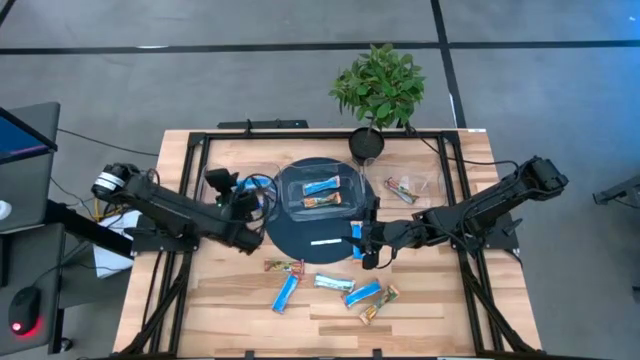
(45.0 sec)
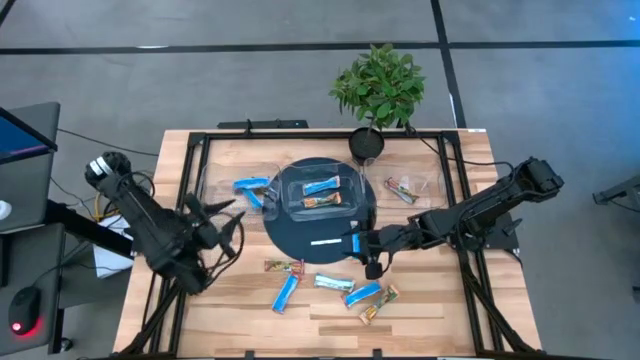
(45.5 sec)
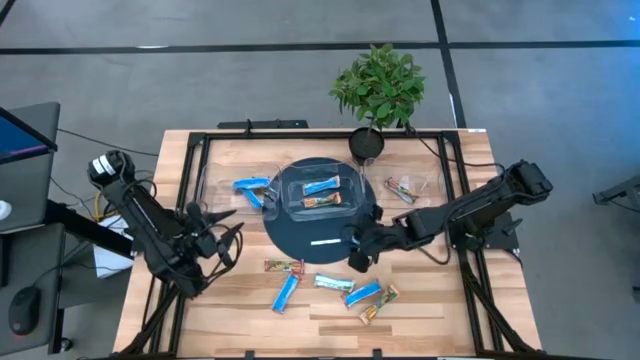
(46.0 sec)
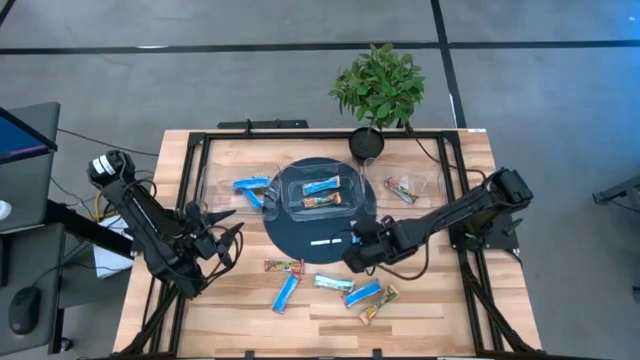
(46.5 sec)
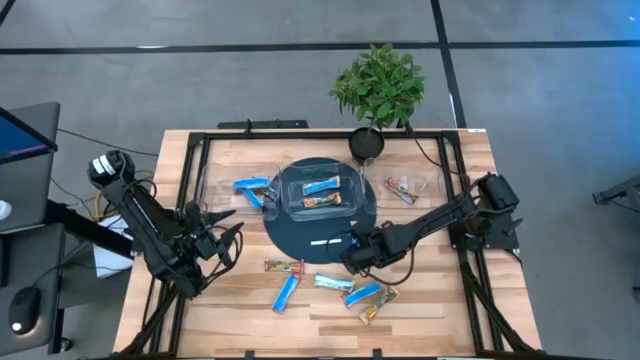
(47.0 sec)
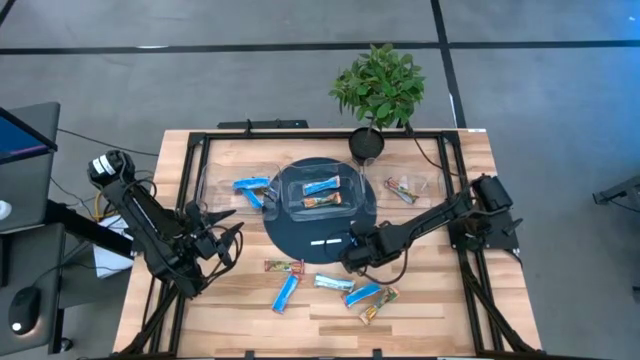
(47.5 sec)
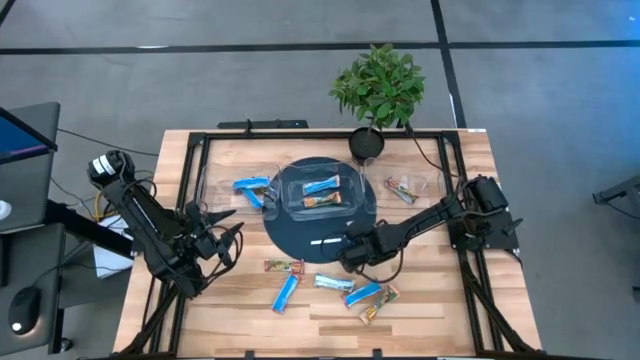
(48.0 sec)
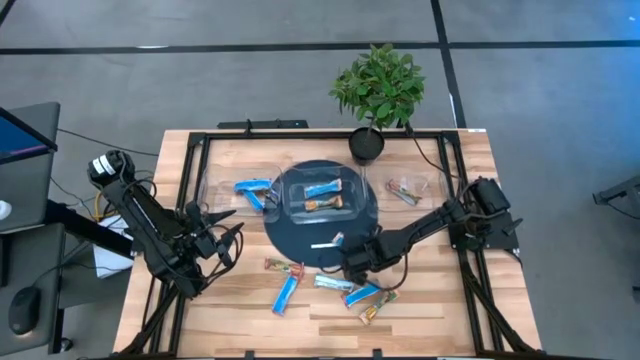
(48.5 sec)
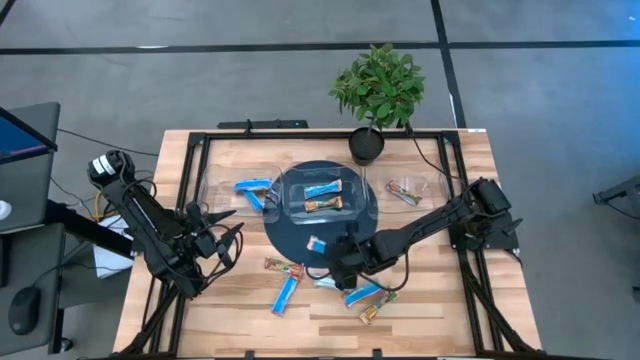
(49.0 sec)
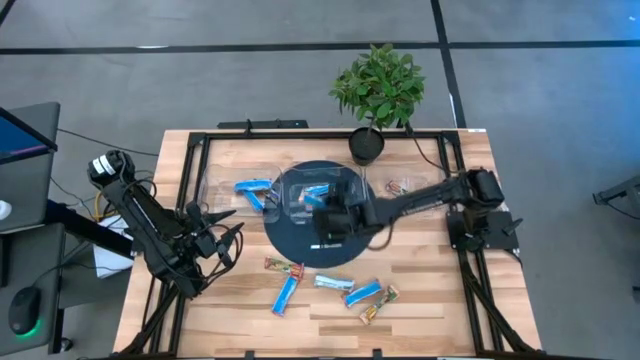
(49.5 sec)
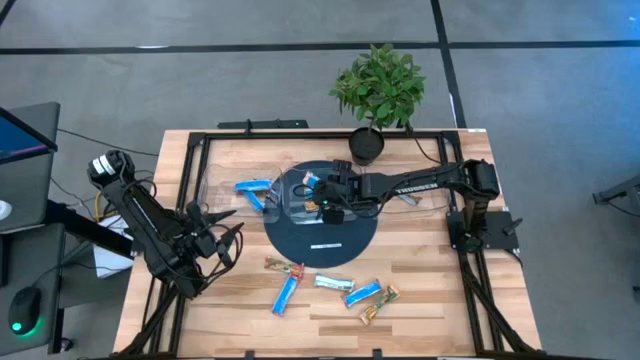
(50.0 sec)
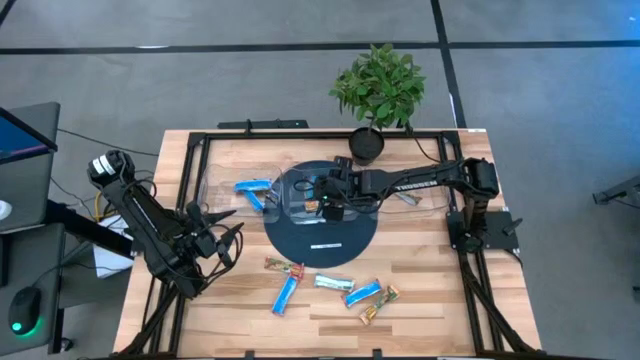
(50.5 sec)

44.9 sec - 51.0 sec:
Task: Pick and place Granola Bars by type
Put the orange snack bar into the middle transparent bin

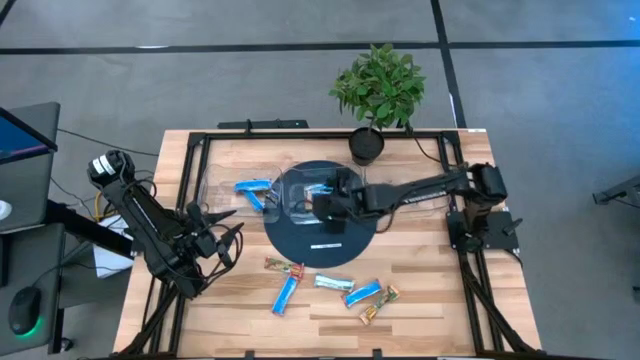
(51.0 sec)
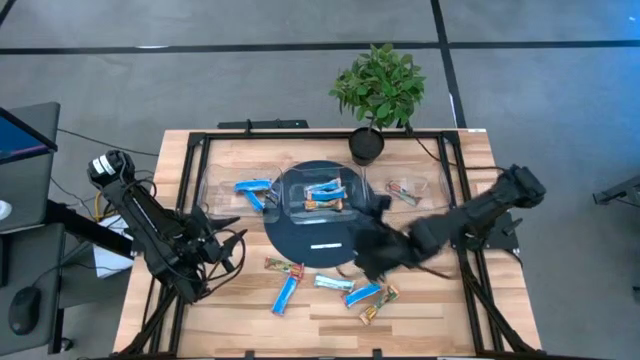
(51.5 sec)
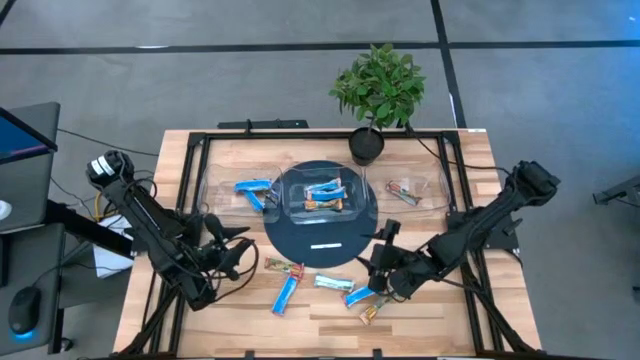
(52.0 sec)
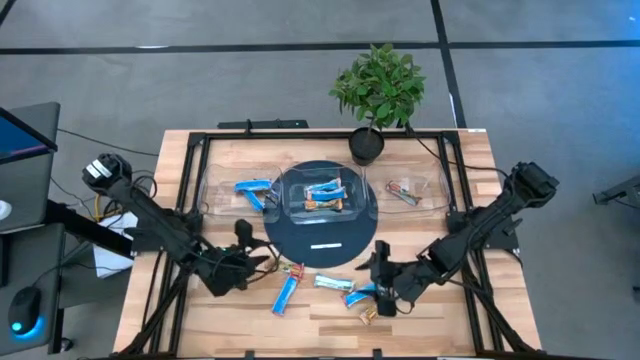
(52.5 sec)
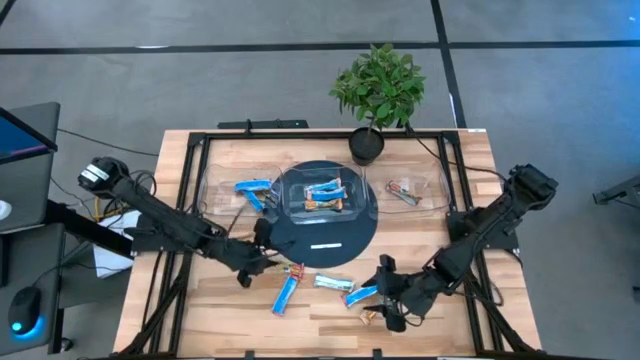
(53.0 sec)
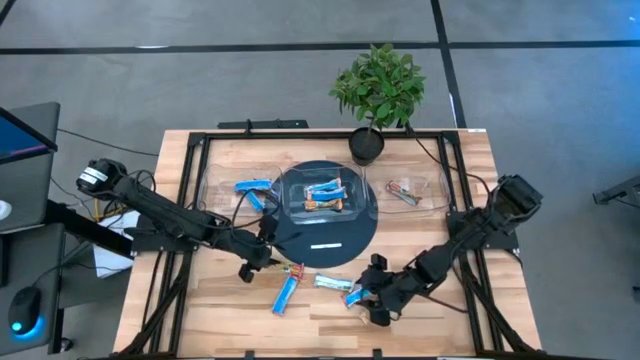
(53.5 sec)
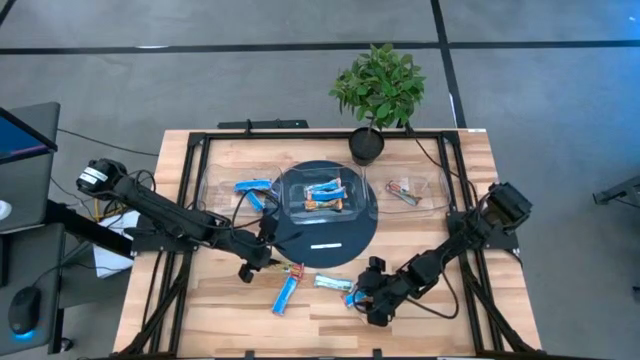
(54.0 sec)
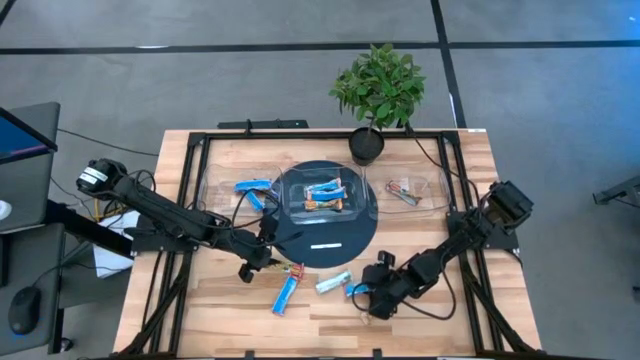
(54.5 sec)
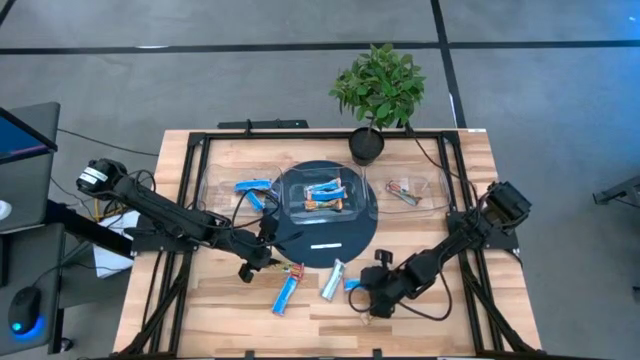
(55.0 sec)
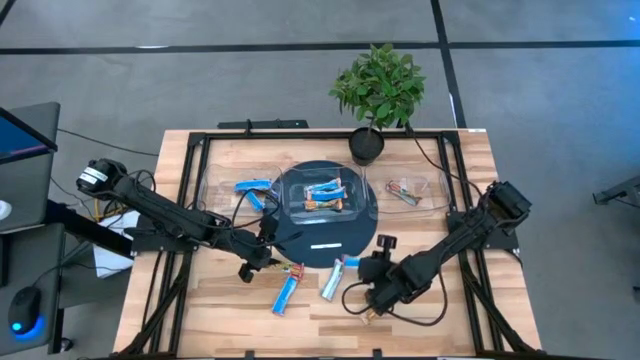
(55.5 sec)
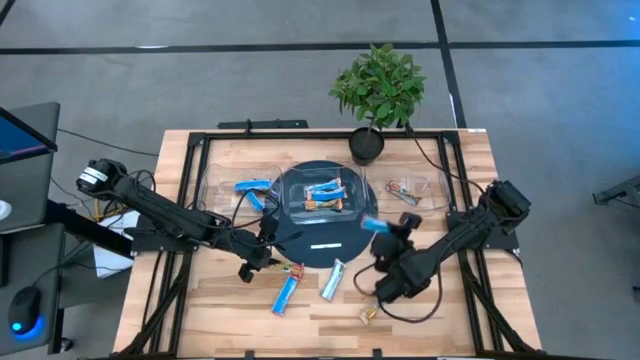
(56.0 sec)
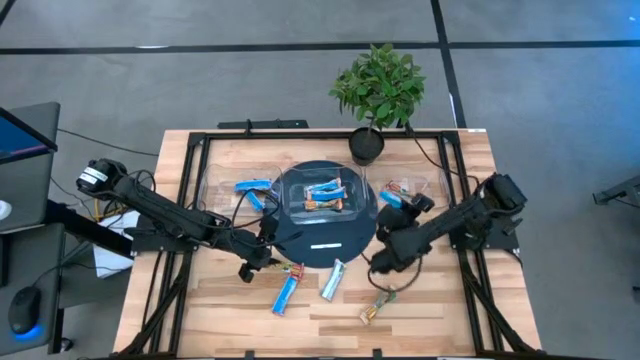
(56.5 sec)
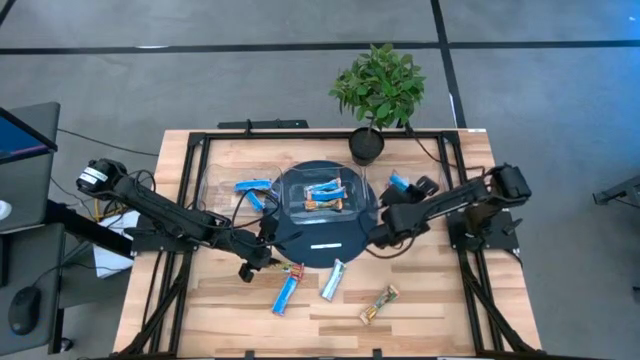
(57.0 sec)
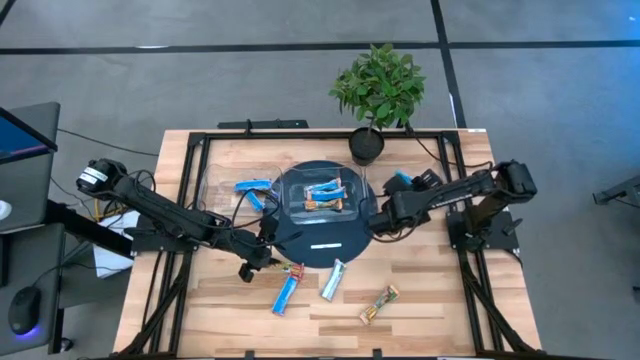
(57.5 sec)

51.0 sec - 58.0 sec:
Put the right red snack bar into the right transparent bin

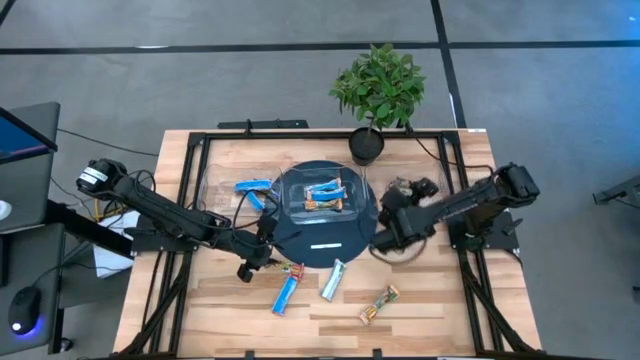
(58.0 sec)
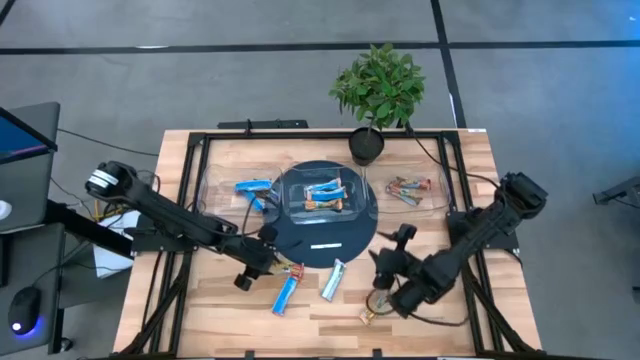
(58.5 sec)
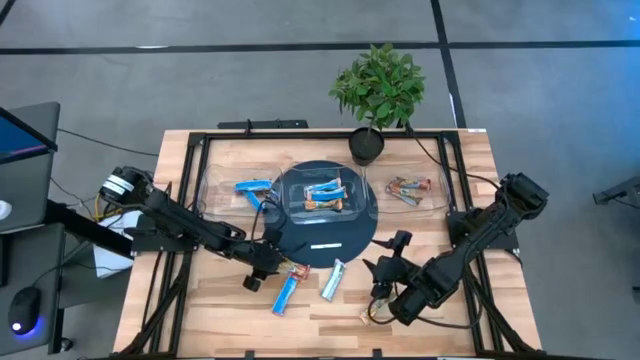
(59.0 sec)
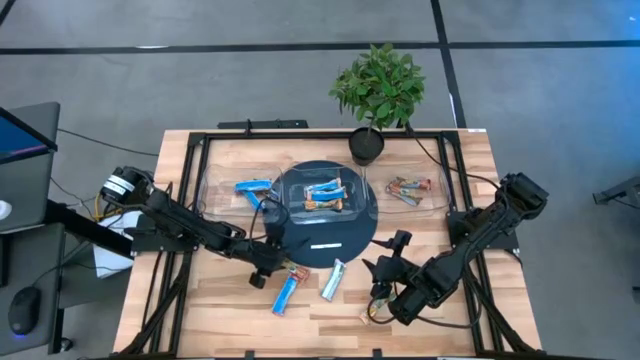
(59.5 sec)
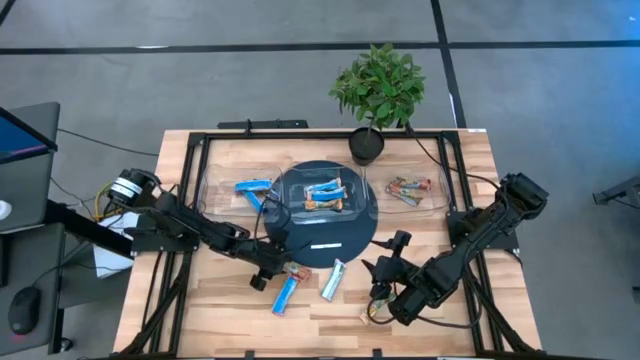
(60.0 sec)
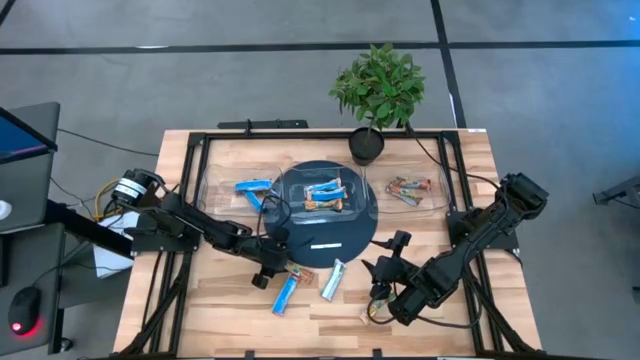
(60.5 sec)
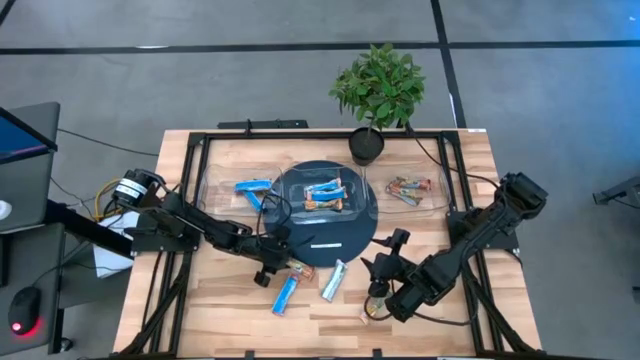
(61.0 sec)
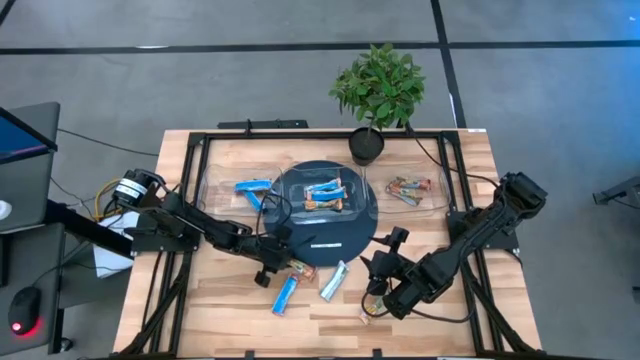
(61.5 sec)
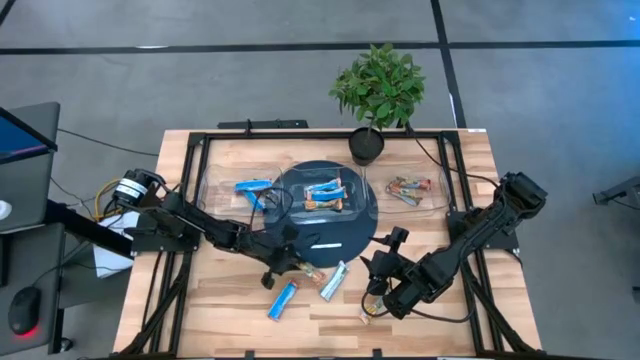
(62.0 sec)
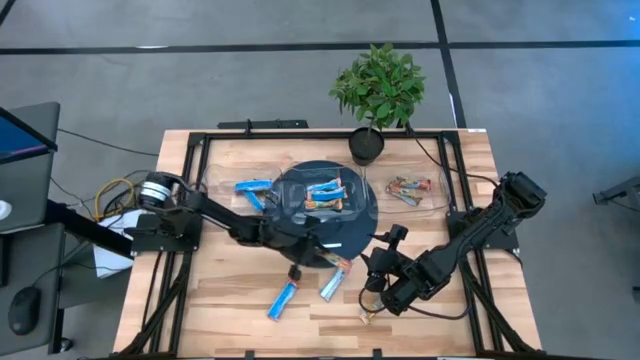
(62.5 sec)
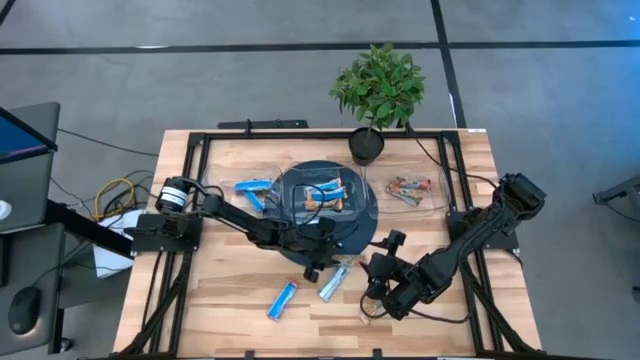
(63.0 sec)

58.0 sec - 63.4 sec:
Move the top left red snack bar to the center of the table

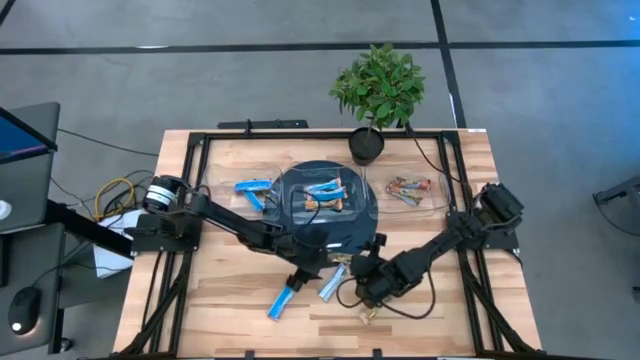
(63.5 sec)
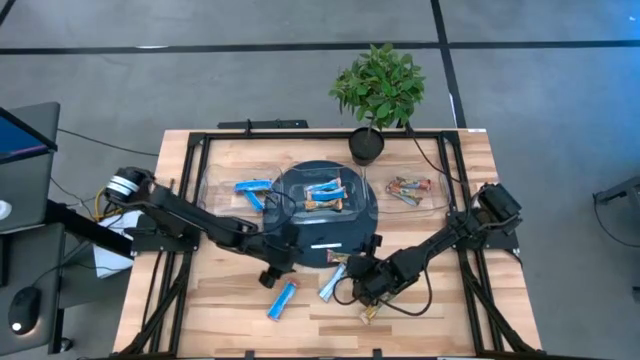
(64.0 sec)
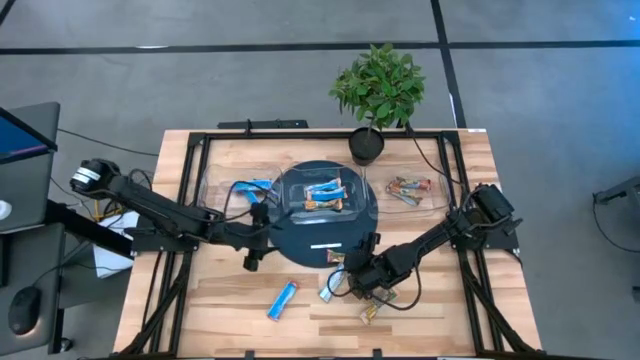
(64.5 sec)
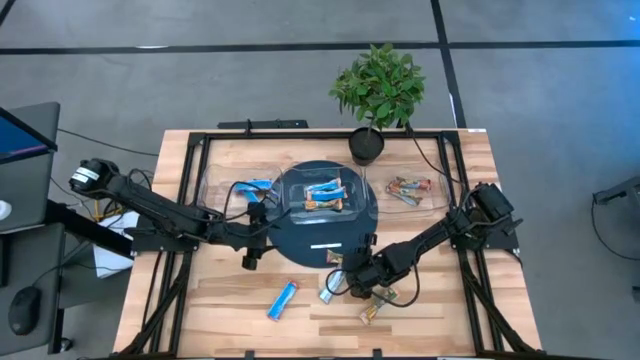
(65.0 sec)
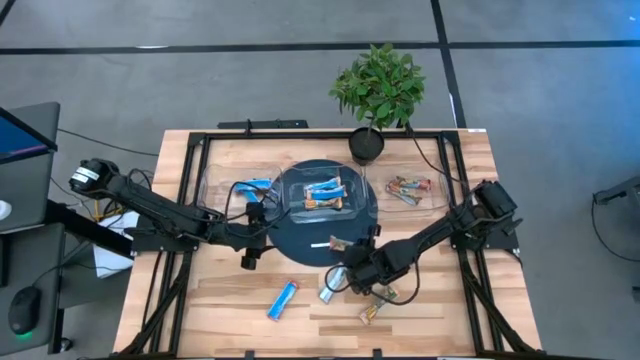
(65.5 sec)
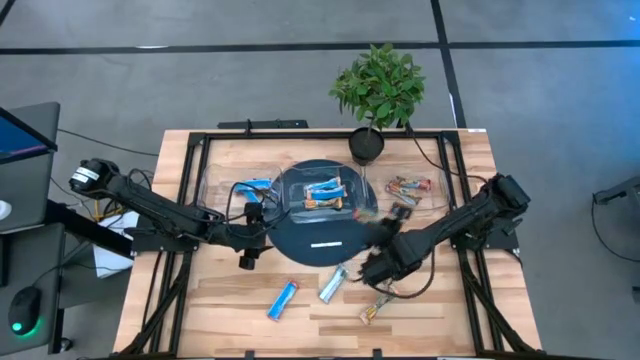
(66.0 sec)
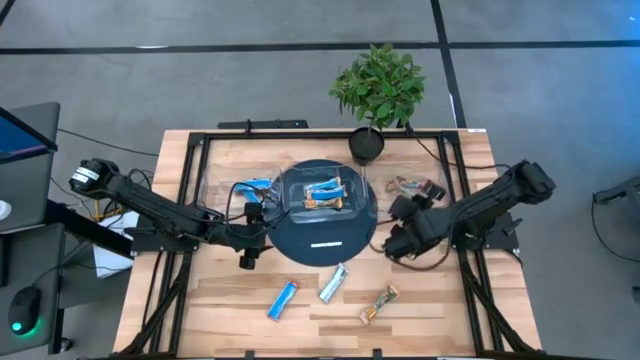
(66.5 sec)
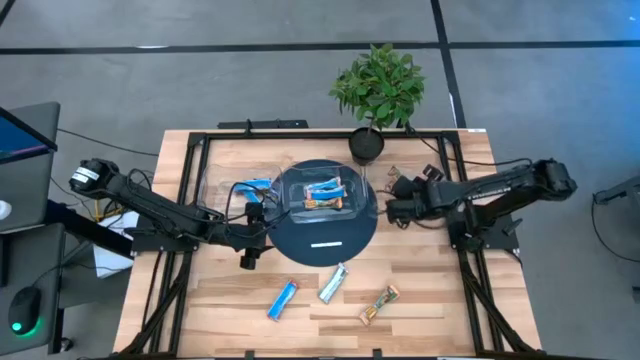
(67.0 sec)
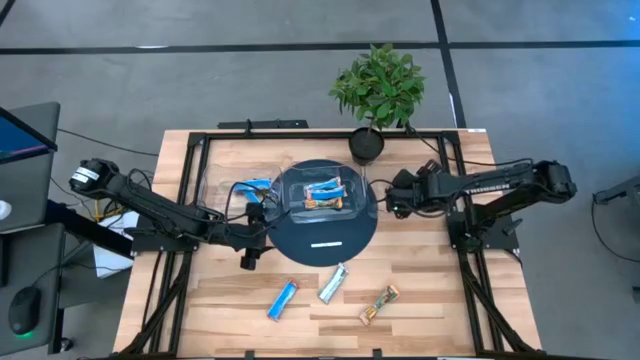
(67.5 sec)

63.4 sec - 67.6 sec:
Put the center red snack bar into the right transparent bin
